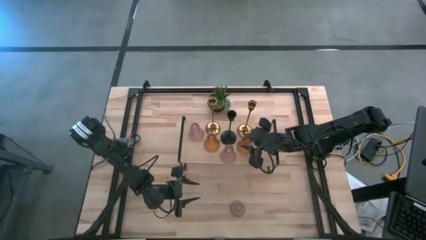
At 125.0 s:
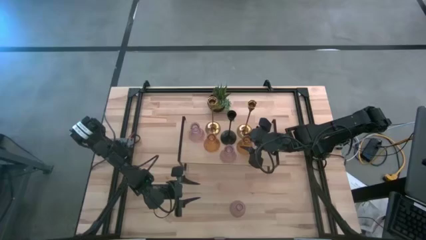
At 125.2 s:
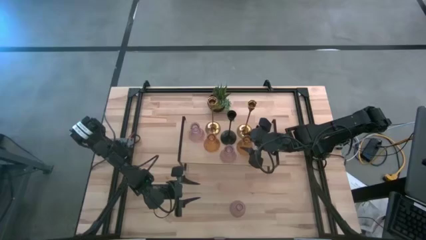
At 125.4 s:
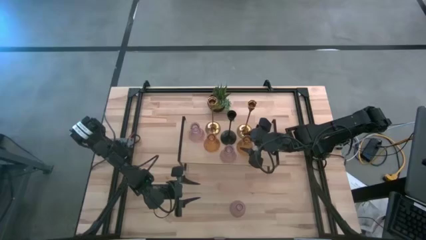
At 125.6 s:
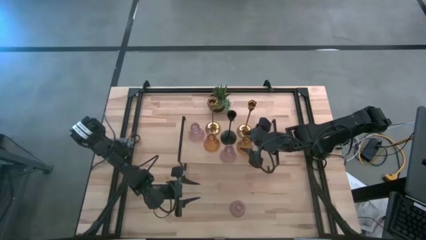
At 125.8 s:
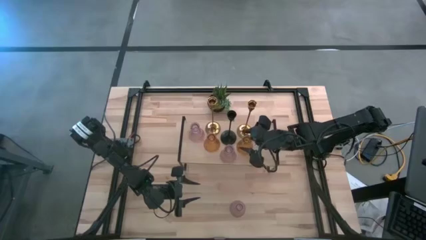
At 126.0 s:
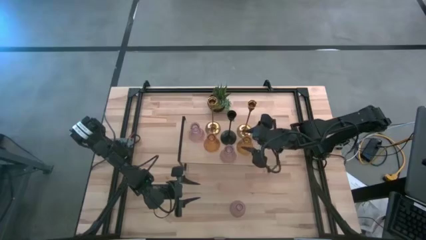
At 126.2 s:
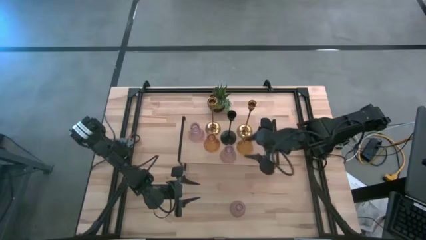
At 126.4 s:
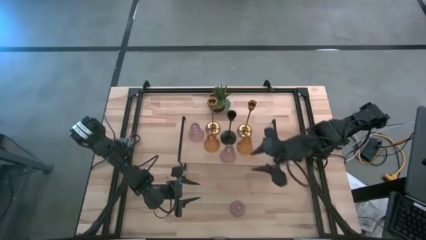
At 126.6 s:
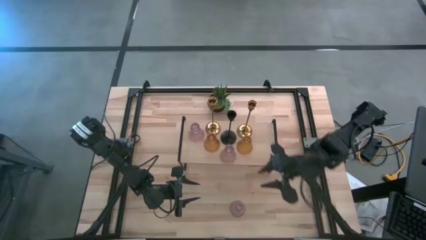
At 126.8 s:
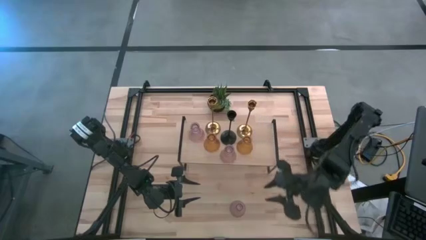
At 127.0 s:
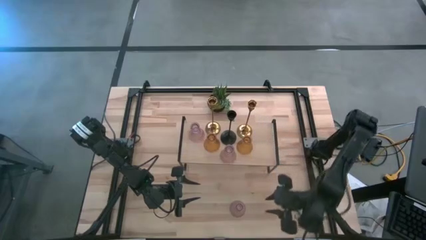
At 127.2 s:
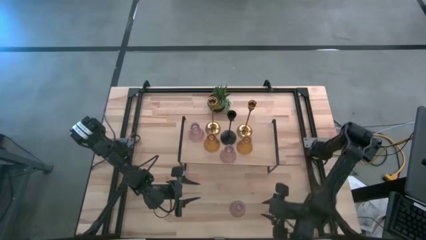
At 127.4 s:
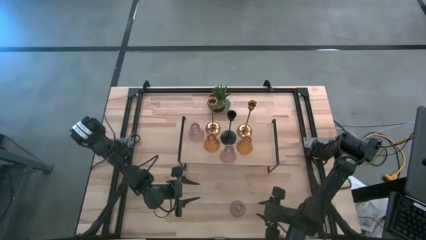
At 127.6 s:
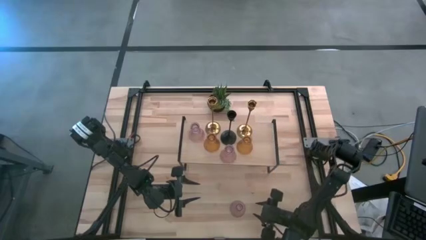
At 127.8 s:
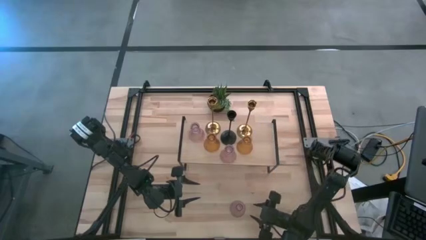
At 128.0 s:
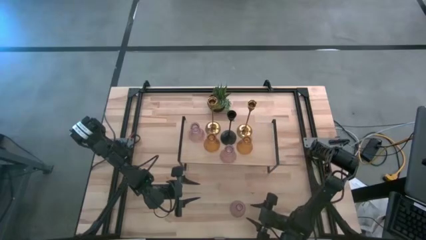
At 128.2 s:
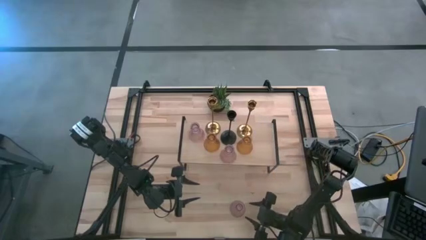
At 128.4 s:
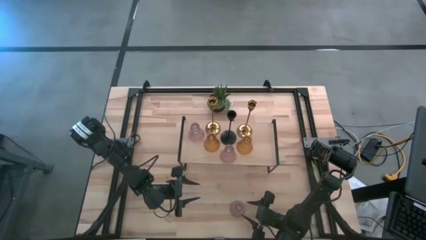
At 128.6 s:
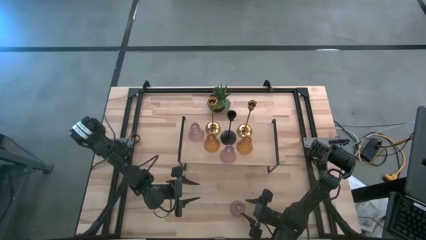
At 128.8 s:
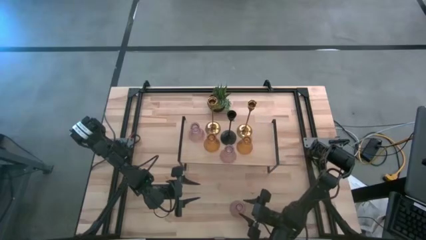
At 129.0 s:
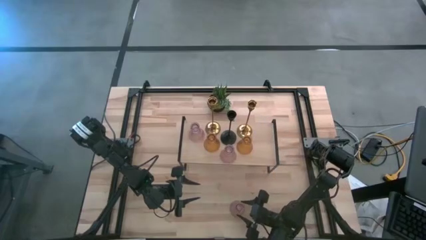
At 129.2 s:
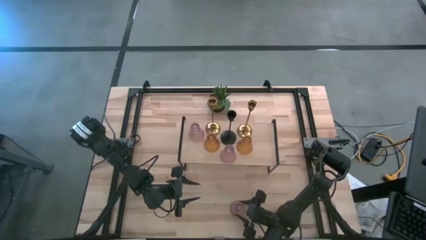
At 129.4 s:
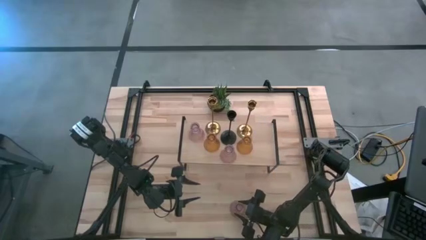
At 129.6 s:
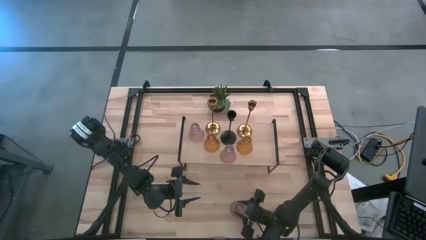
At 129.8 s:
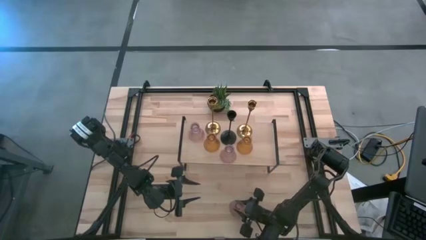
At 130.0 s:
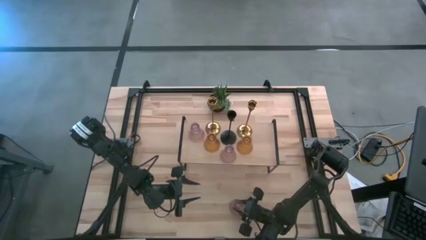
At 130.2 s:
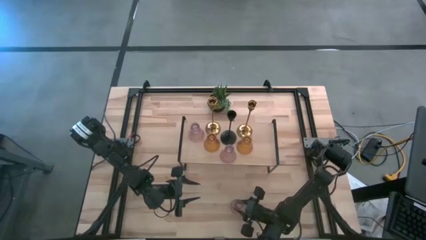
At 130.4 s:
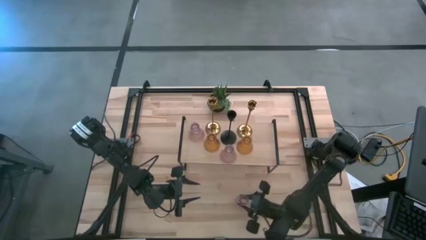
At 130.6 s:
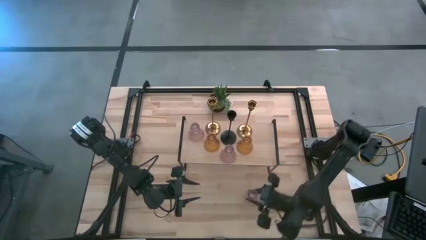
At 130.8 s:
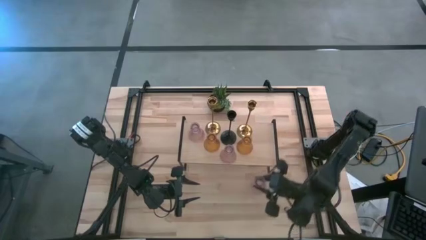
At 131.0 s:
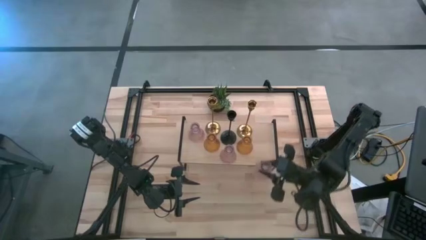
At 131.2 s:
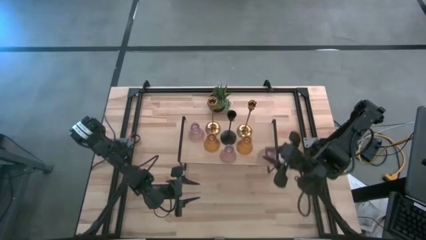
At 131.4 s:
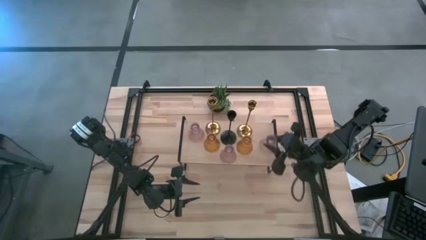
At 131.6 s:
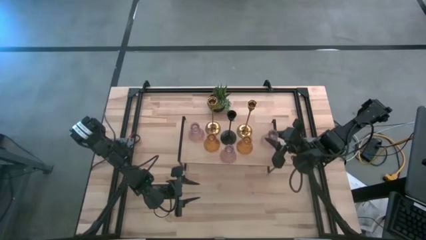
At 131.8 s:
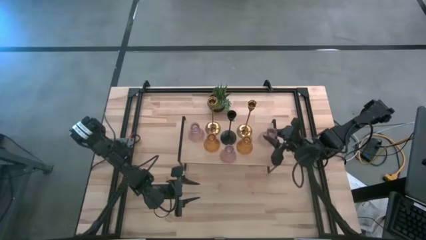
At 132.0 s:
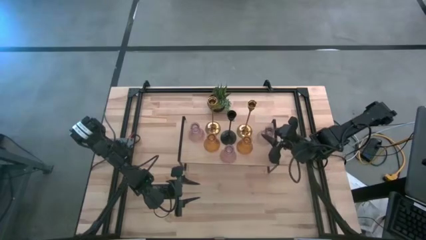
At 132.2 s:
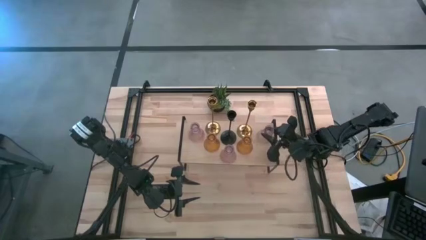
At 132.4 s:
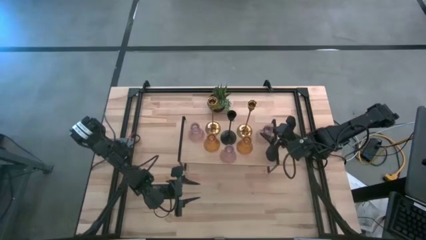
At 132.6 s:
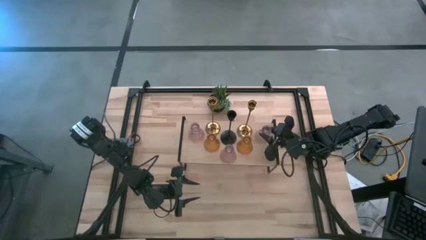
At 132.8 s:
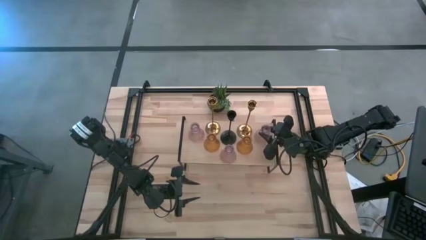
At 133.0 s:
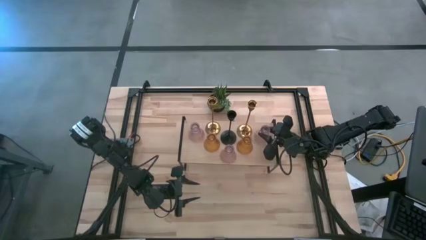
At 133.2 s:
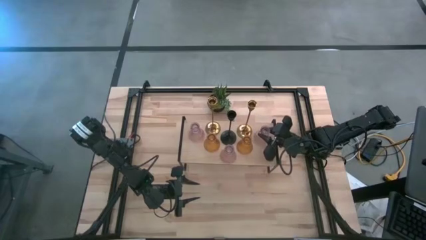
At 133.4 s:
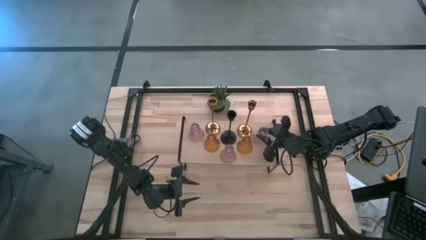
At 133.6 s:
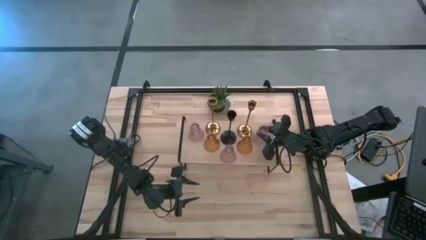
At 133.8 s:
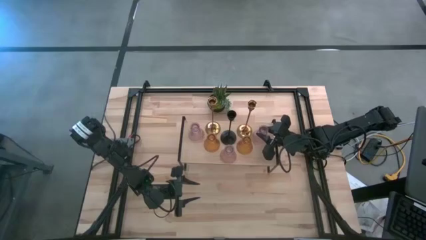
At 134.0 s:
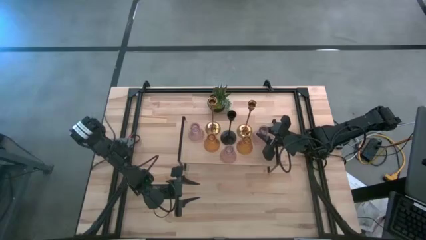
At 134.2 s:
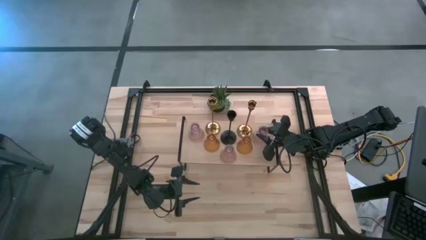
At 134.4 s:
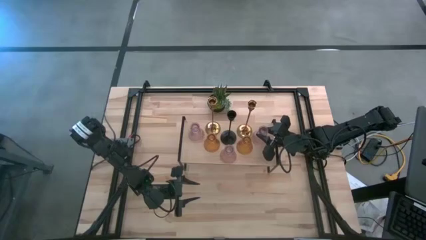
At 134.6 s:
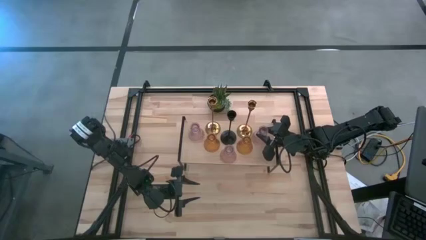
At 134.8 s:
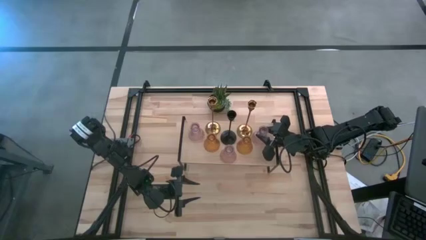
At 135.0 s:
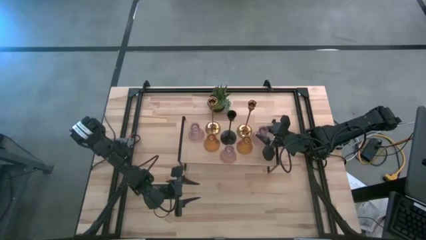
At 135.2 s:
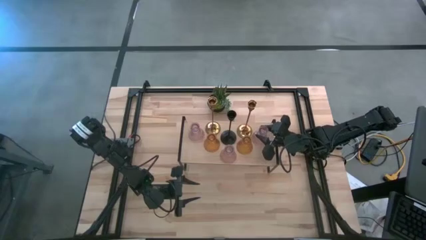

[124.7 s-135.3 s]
Task: Pick & Place candle stick holders
Put the pink glass candle holder on the shelf

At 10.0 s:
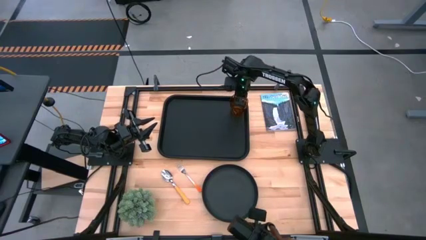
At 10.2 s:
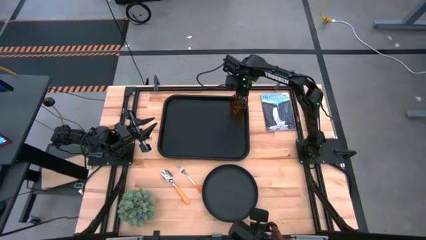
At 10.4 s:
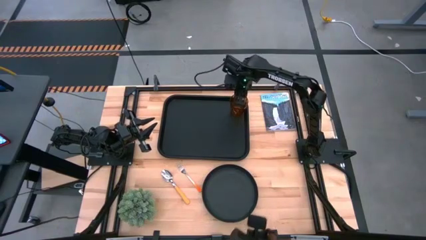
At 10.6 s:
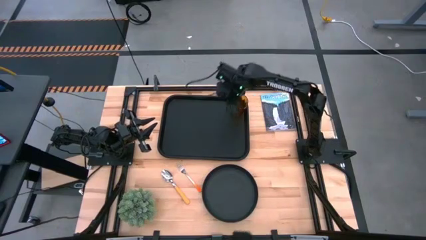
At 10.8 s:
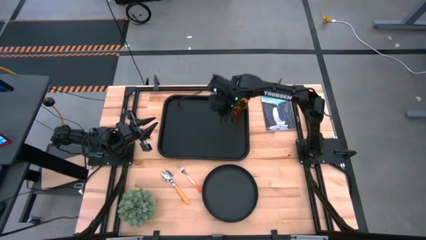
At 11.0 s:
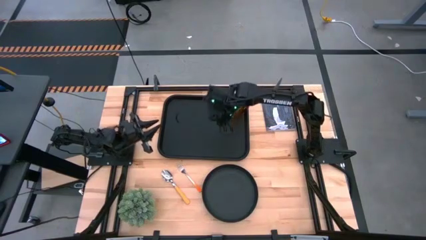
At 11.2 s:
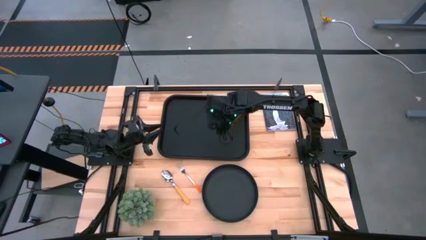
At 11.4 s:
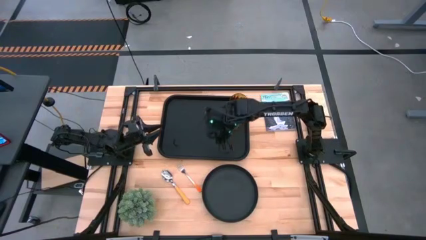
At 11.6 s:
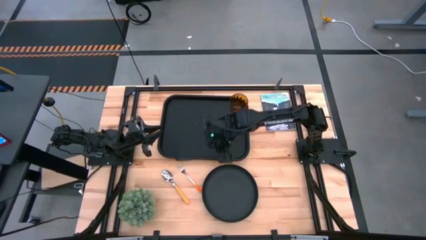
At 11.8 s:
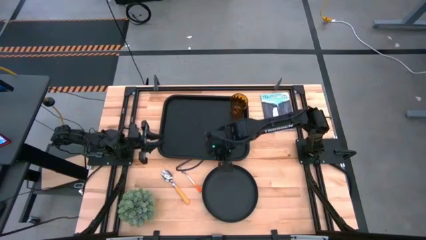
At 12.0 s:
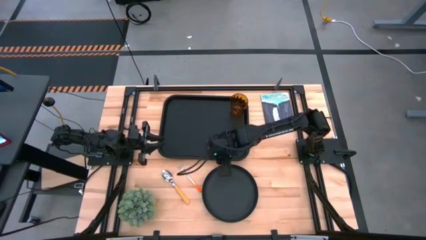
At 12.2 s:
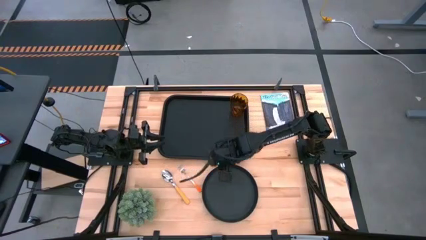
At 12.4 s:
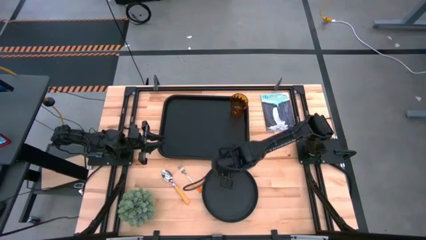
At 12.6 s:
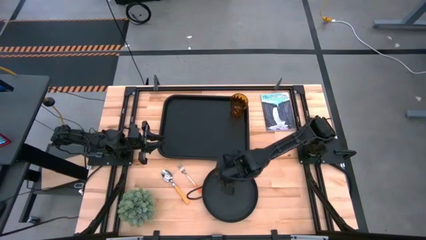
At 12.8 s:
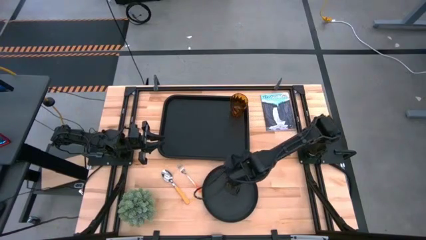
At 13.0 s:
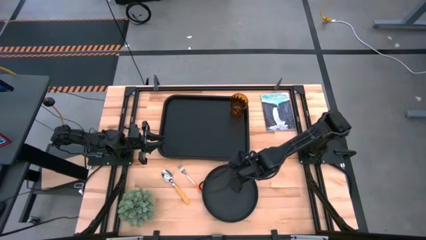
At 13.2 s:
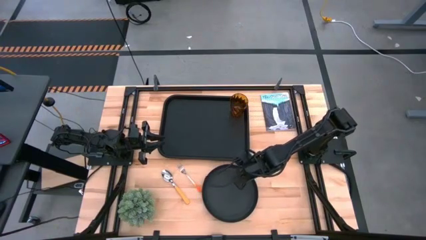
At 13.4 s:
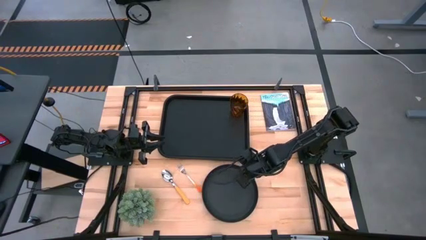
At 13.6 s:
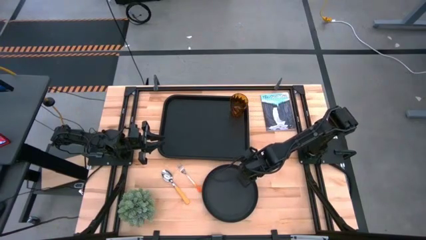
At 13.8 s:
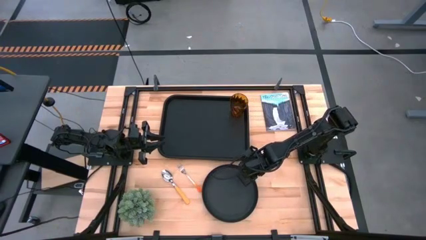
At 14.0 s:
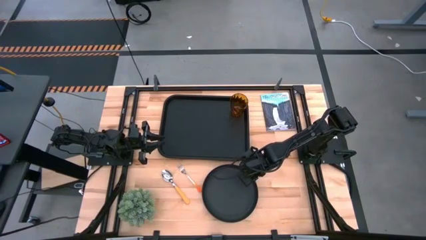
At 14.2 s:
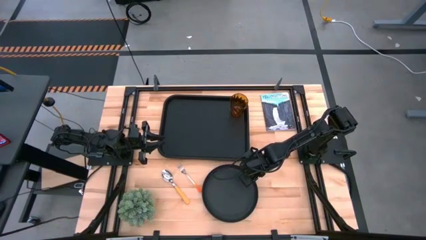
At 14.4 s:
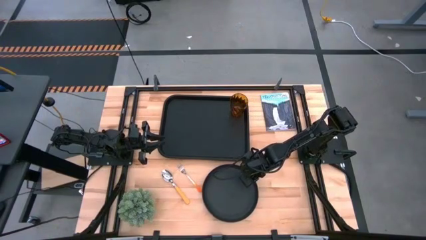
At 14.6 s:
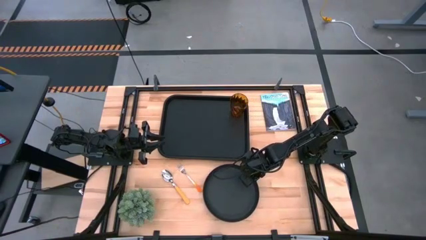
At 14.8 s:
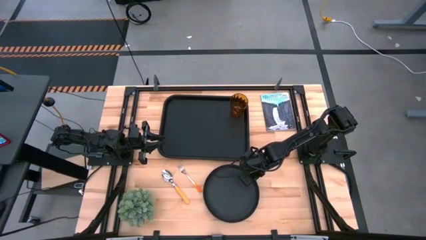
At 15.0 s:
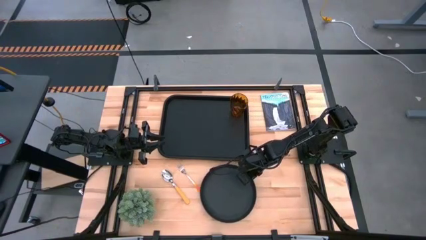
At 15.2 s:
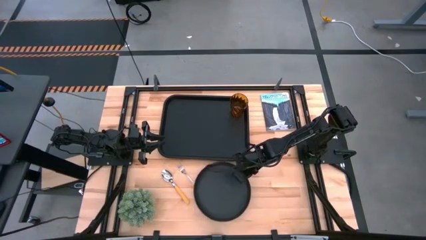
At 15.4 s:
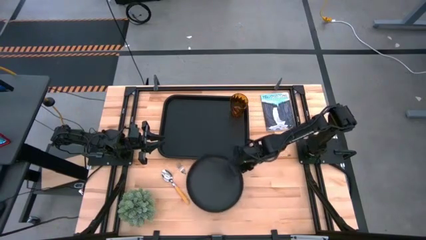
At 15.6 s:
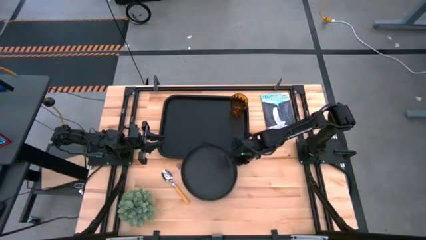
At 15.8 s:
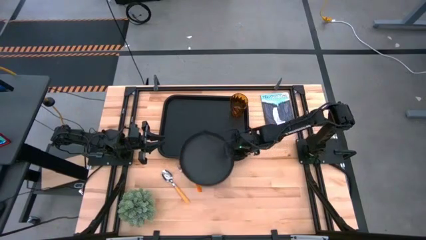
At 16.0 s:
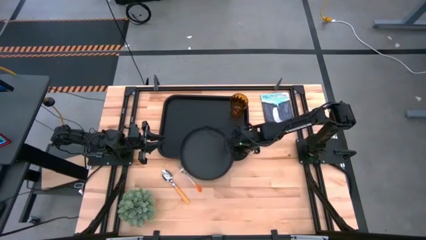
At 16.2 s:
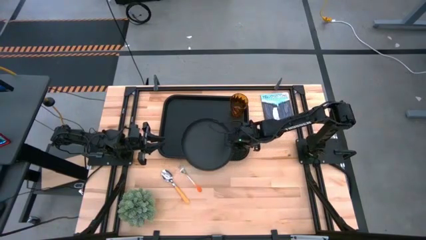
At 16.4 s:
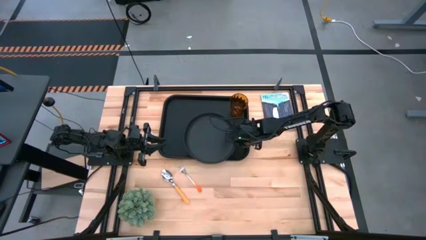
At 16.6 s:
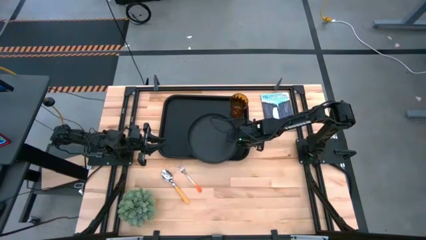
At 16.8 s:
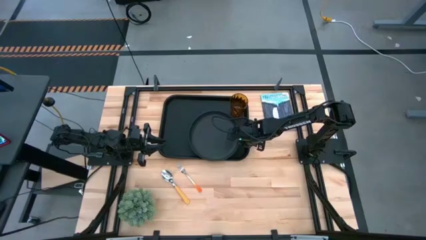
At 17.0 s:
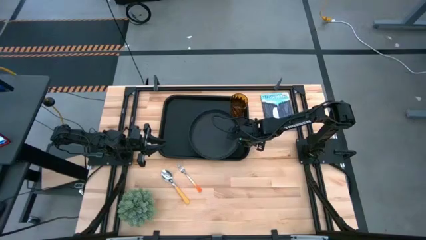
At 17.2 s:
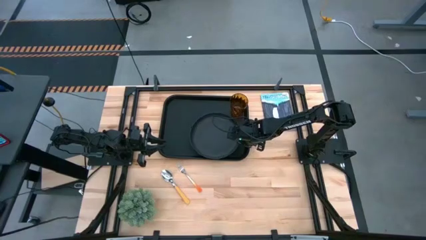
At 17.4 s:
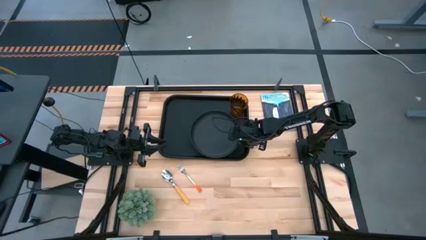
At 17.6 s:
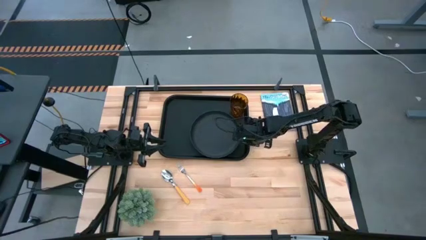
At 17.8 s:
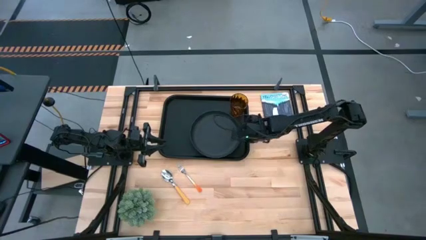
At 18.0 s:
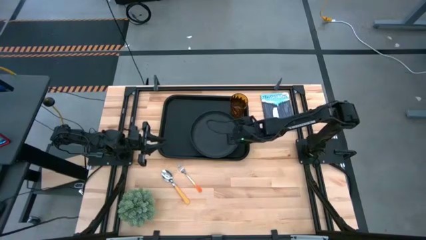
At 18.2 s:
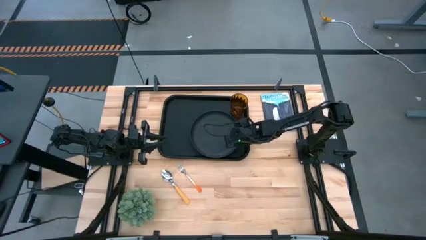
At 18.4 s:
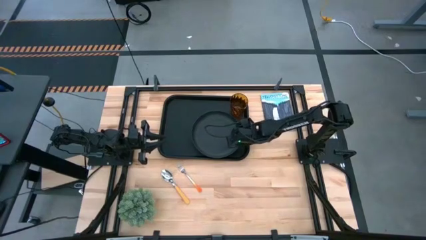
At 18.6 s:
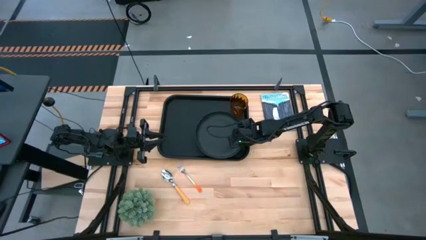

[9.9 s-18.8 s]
Task: Pick and place plate/cup/fork/spoon on tray
Put the black plate on the black tray below the brown cup
